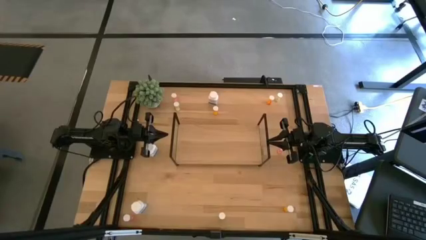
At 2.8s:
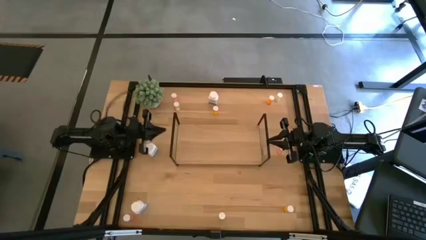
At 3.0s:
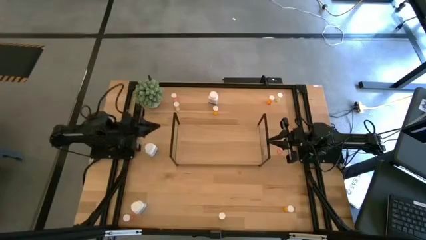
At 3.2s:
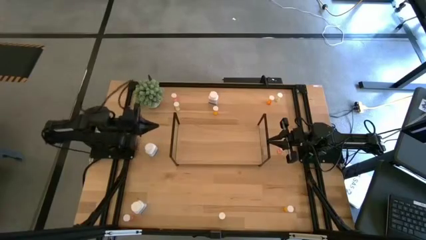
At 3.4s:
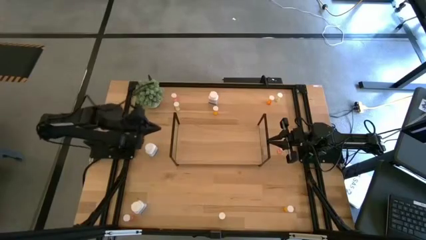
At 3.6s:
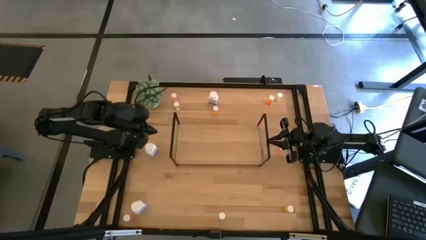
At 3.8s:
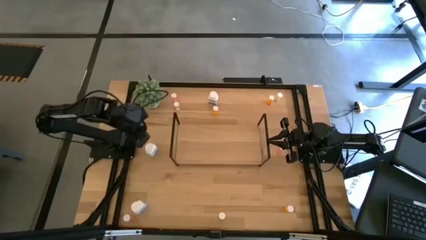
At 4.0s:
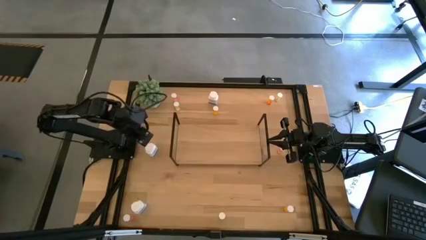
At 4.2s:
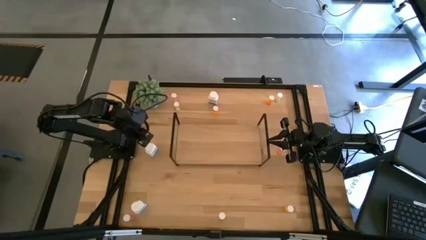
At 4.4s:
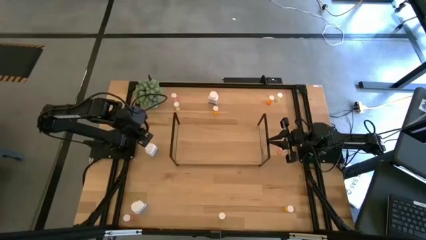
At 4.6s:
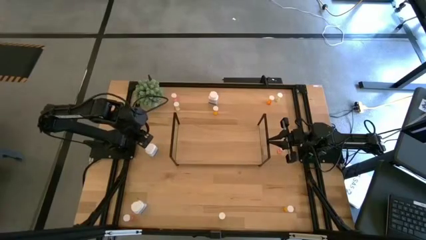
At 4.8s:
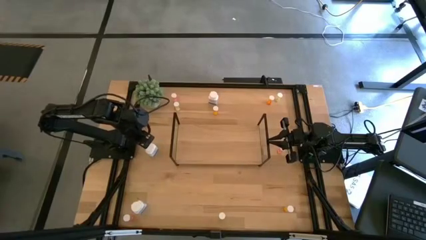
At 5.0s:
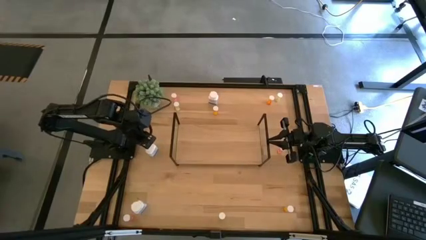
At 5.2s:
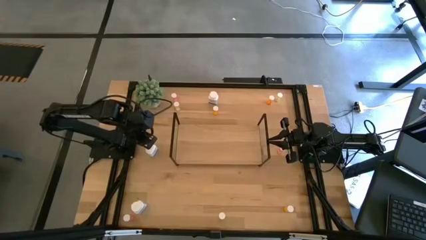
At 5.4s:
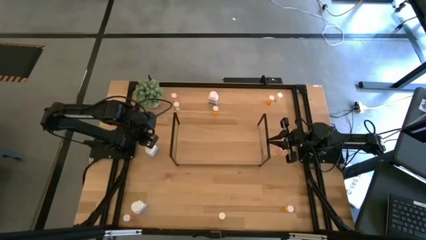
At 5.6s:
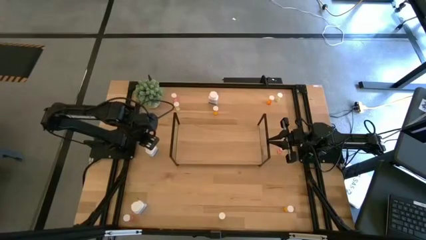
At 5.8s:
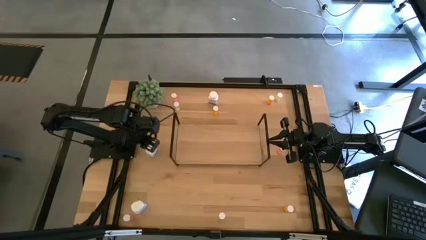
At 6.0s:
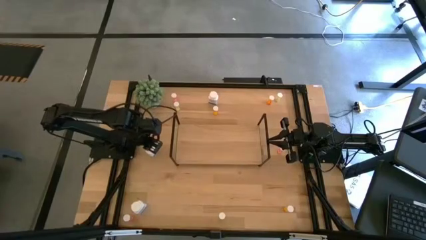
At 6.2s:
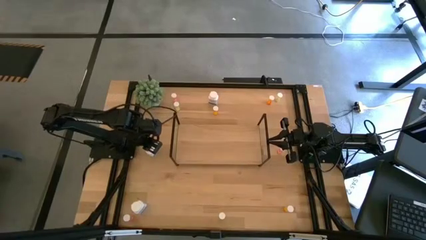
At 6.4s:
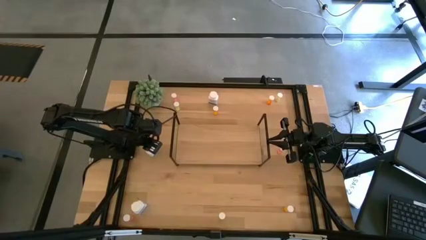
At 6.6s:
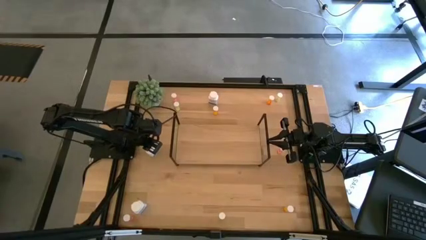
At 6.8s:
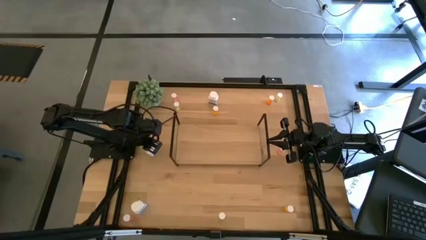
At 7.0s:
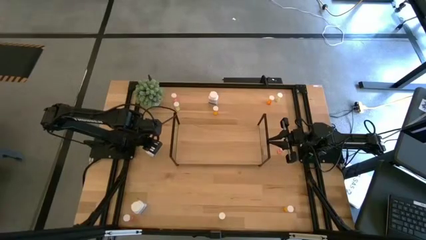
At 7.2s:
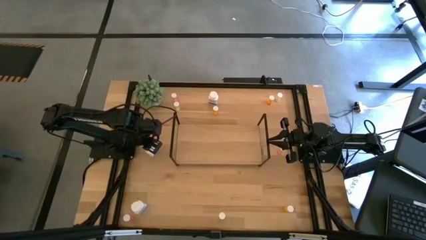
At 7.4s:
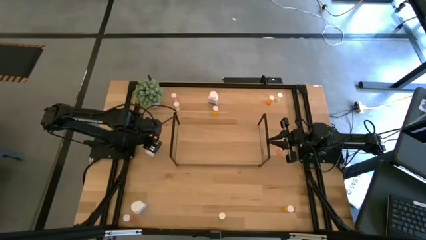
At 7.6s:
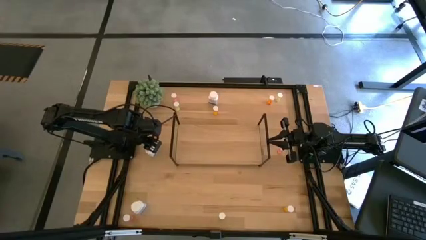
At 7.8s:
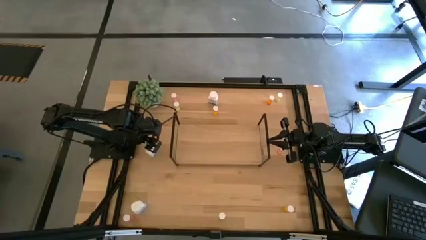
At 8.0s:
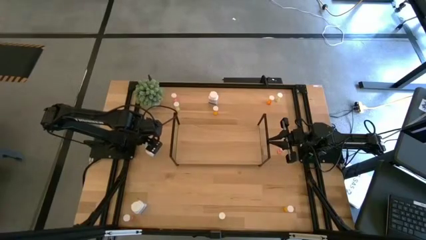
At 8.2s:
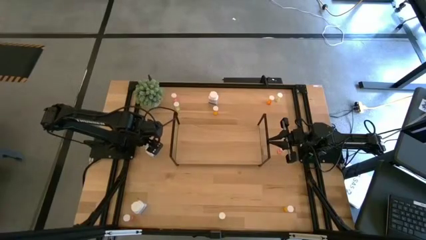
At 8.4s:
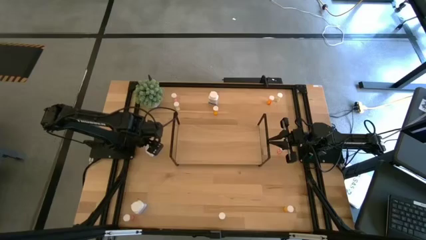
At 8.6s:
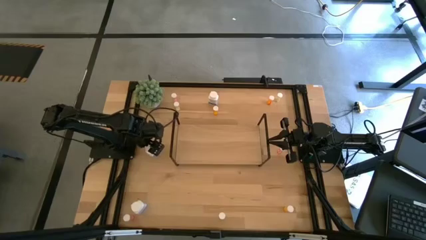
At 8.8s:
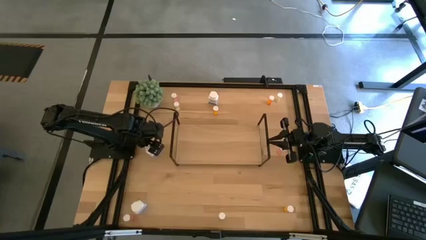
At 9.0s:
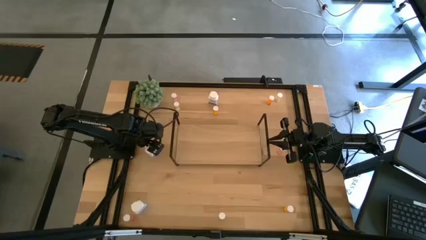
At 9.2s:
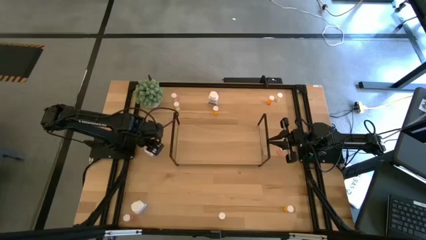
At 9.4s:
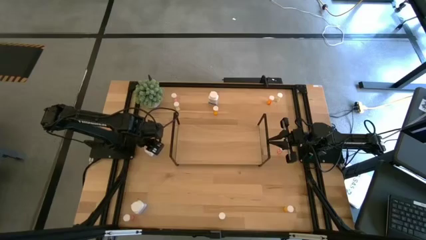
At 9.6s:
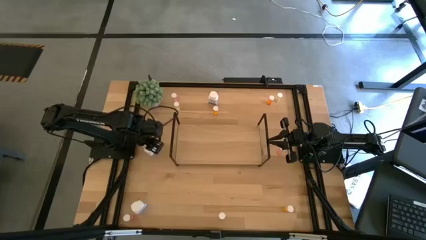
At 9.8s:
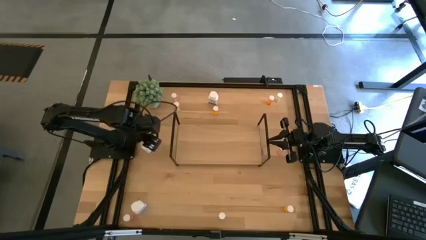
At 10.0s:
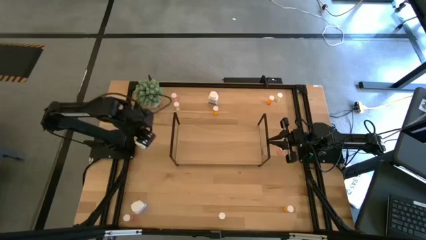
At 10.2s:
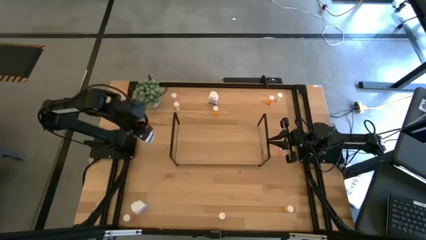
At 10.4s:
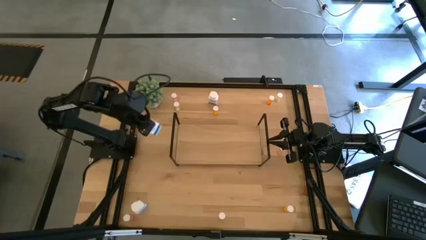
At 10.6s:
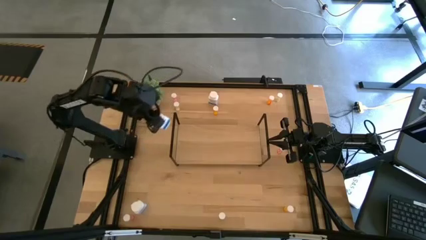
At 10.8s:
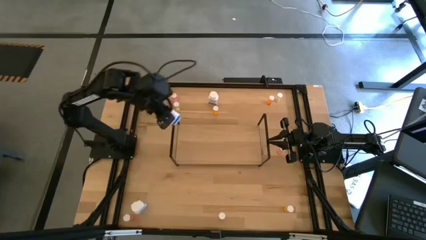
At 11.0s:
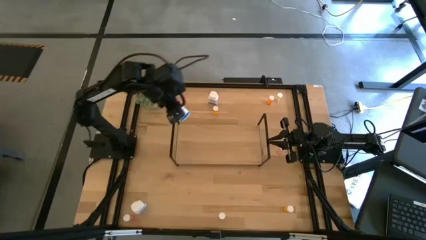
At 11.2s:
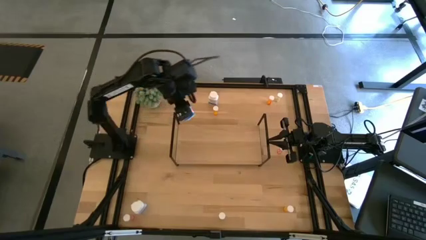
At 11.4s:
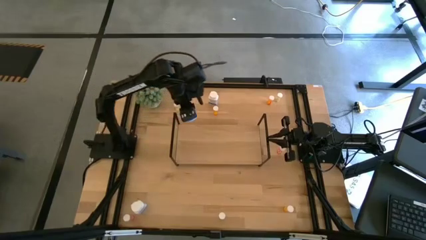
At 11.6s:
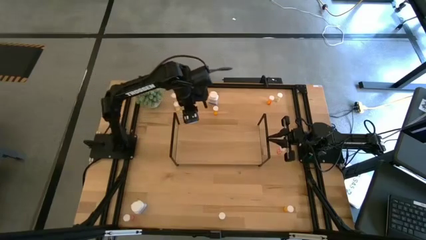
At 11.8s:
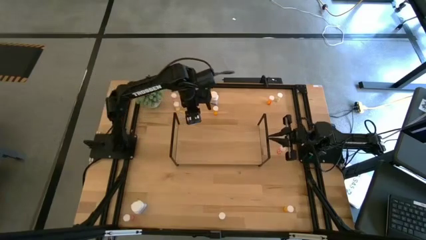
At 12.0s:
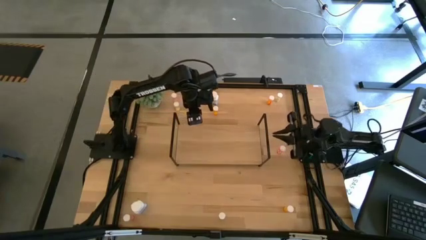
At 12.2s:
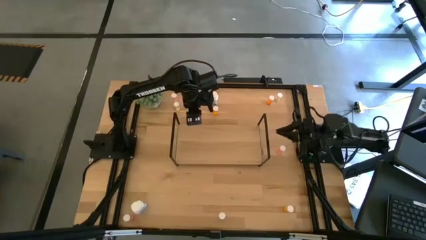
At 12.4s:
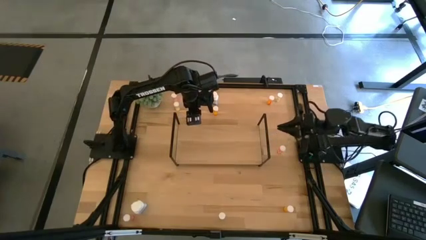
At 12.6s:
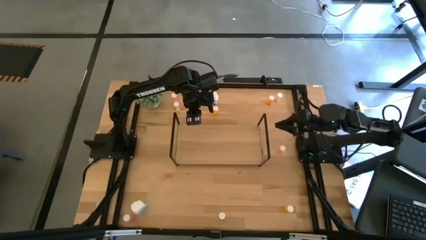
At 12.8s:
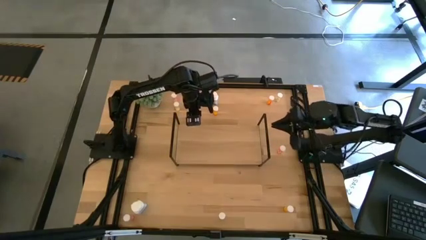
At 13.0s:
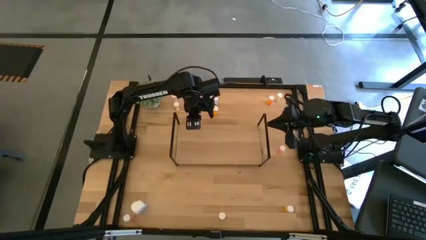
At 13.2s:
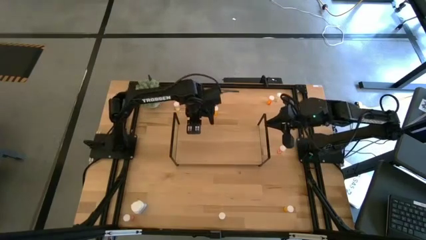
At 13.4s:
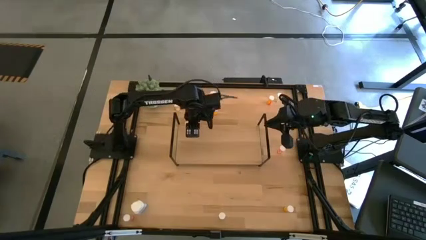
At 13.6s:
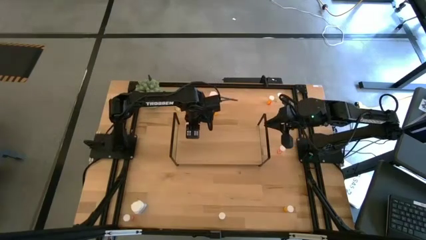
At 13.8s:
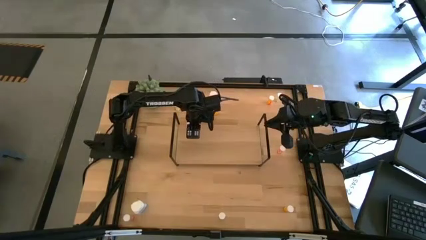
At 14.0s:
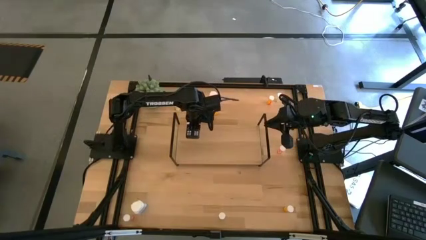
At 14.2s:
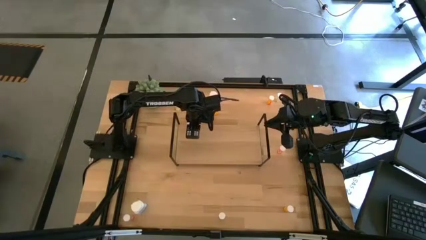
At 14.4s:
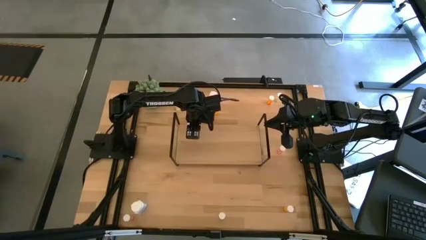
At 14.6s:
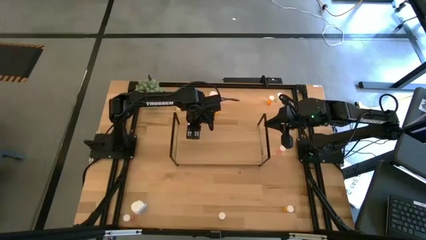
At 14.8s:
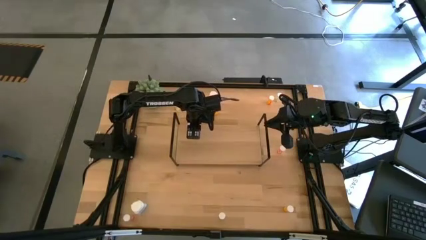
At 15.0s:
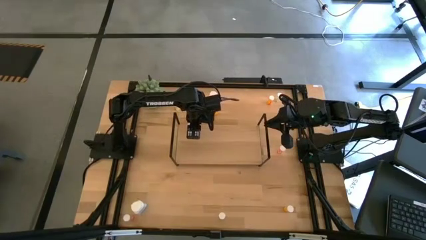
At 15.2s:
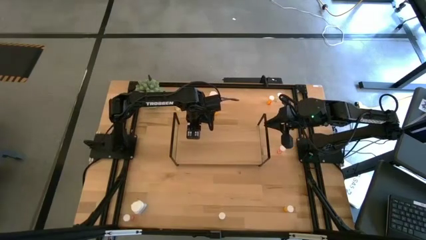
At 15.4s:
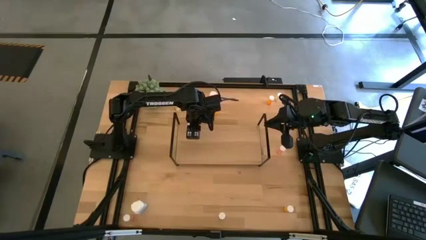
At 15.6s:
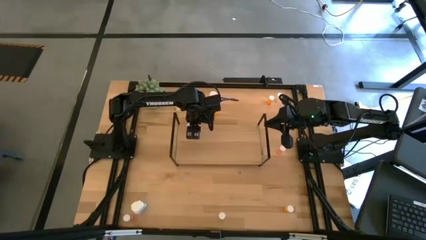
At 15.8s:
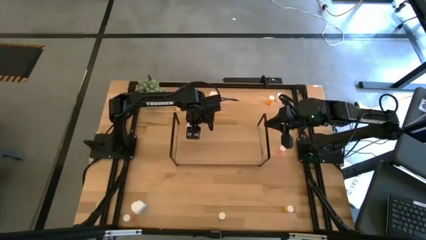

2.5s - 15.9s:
Task: Pick and place medicine bottles onto shelf by color
Put the middle left white pill bottle on the shelf

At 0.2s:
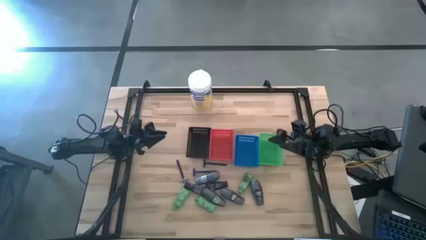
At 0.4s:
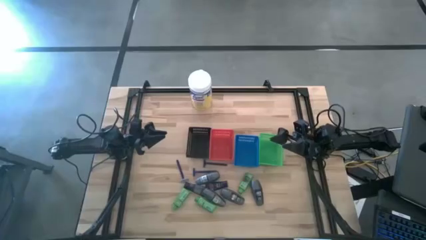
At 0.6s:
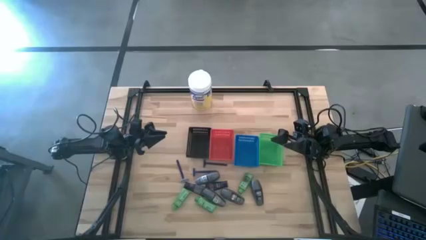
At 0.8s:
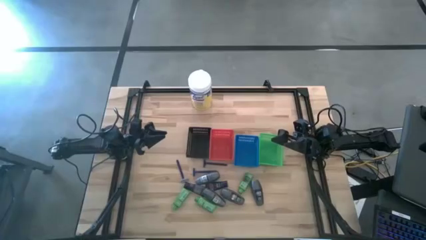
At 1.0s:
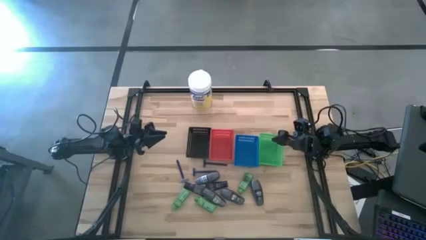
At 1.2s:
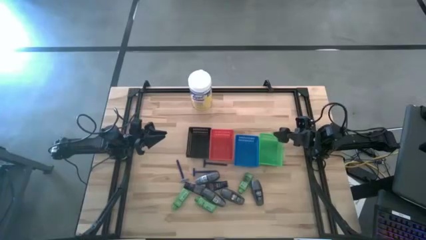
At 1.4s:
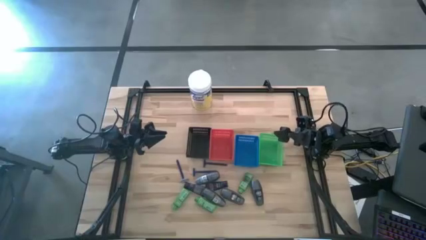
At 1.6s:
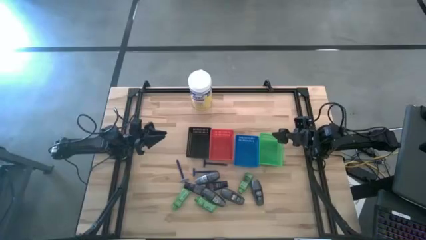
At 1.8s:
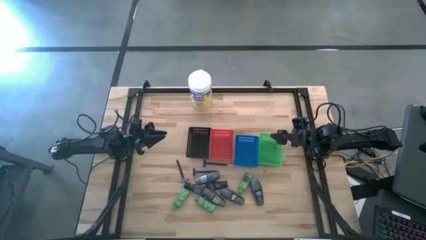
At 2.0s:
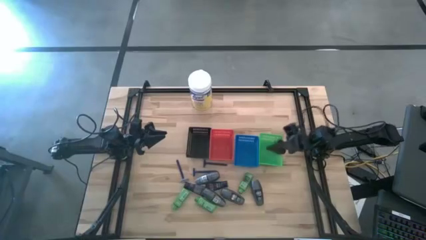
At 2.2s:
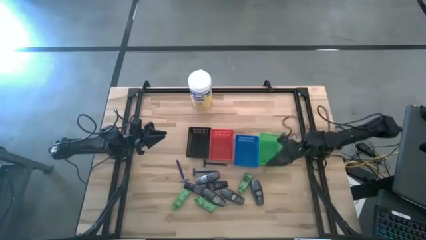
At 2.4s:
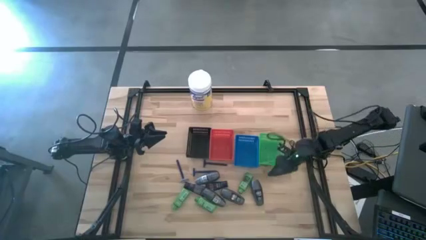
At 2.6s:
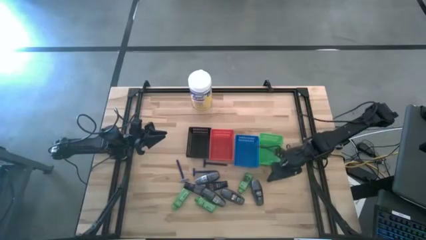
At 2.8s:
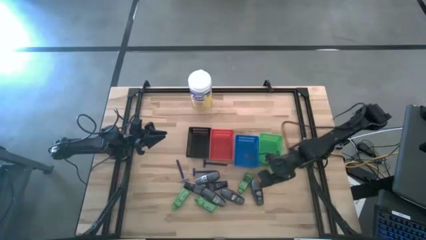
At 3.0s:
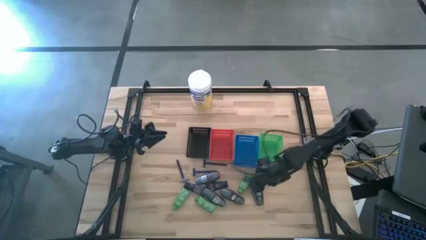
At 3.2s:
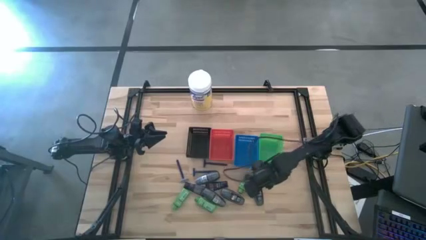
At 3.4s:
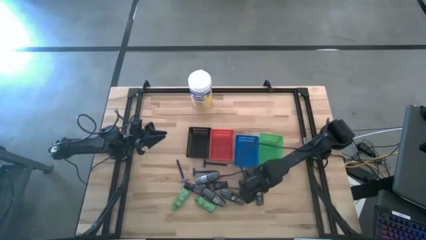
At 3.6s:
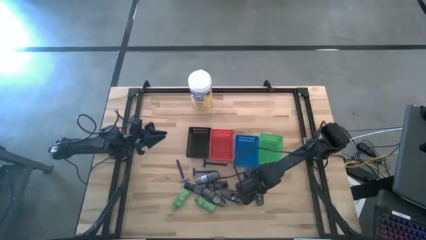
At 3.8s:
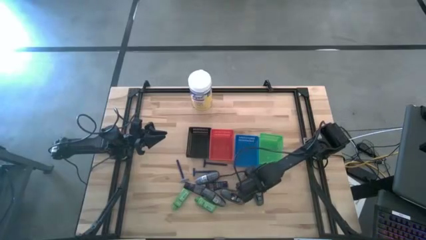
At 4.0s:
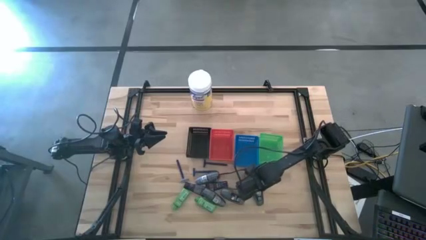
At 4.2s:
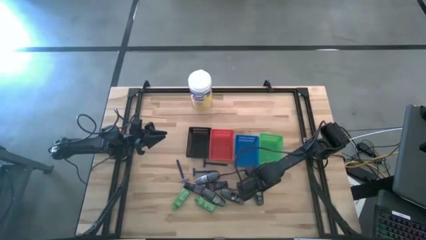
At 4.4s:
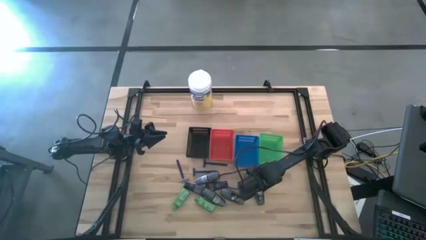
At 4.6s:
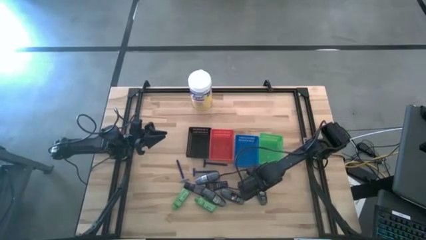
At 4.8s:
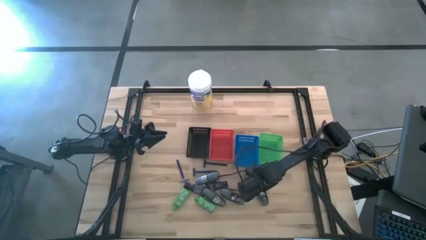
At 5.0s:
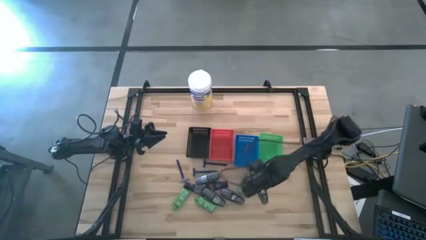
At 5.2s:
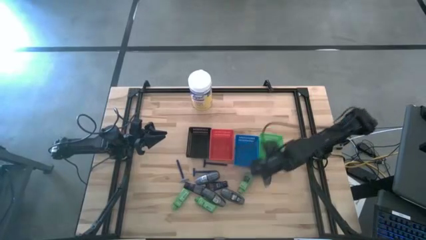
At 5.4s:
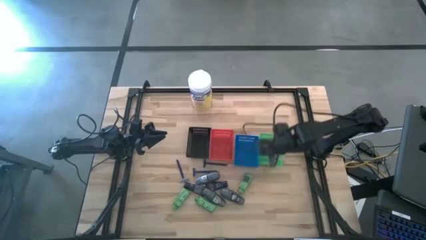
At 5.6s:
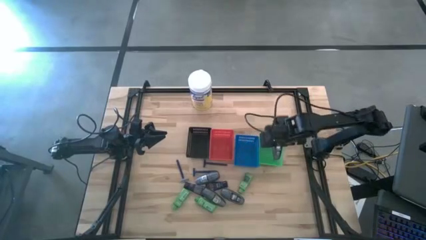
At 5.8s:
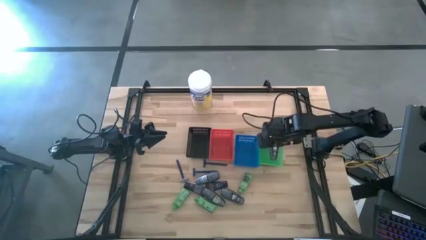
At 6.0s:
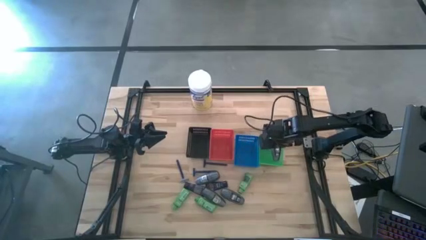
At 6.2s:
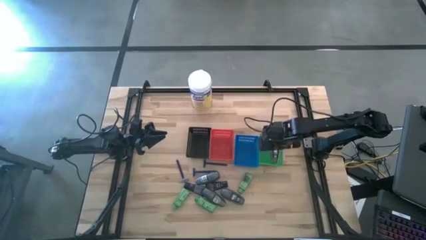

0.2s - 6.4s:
Task: Pick & Place Travel size toiletries
Put the gray deodorant into the green bin
